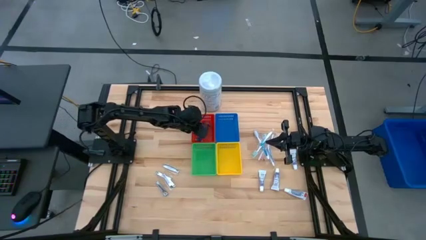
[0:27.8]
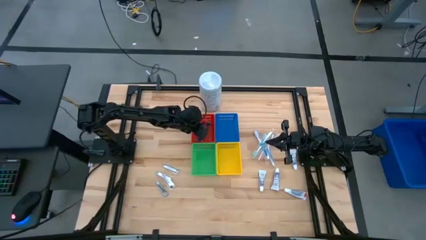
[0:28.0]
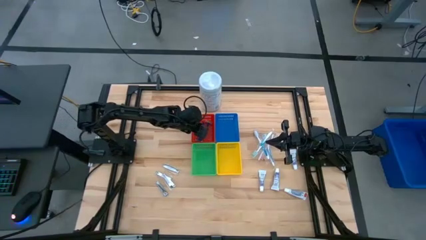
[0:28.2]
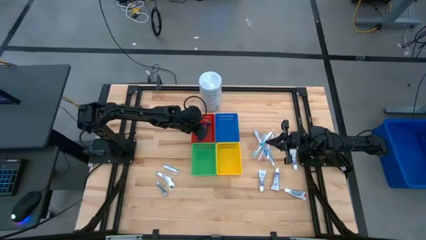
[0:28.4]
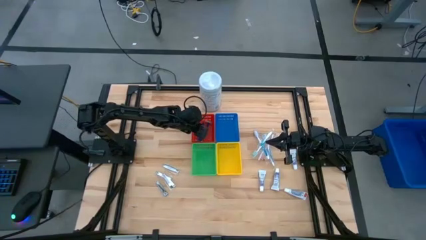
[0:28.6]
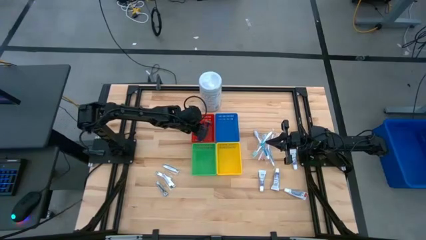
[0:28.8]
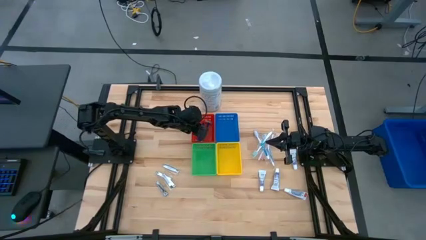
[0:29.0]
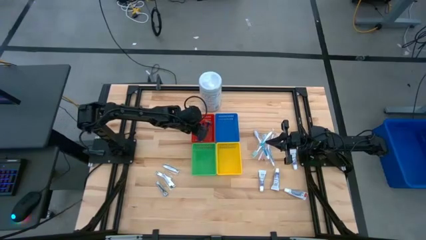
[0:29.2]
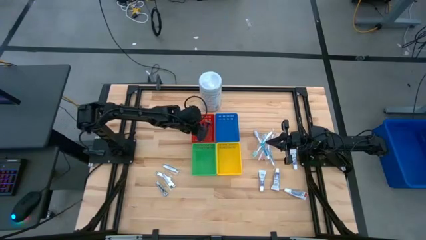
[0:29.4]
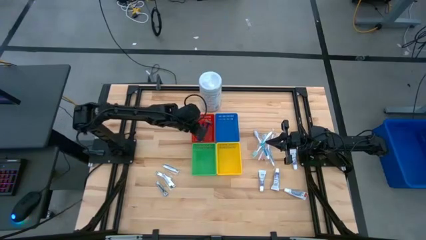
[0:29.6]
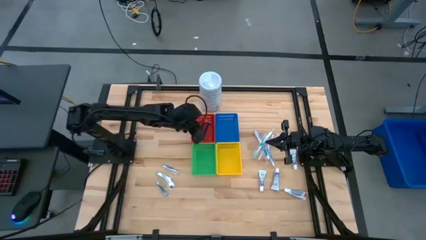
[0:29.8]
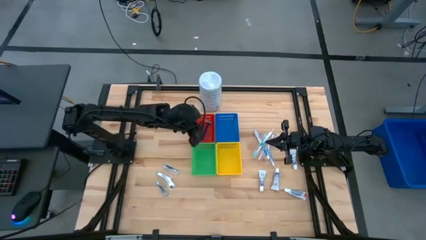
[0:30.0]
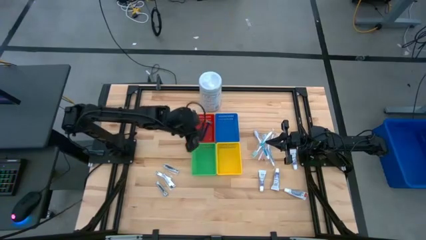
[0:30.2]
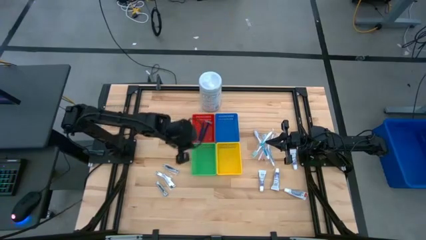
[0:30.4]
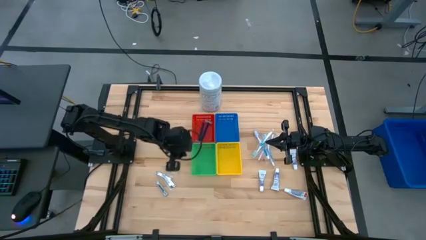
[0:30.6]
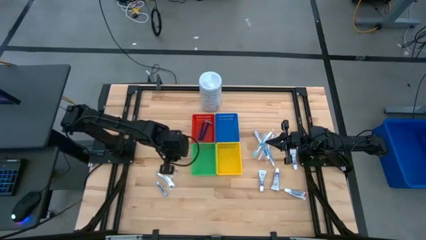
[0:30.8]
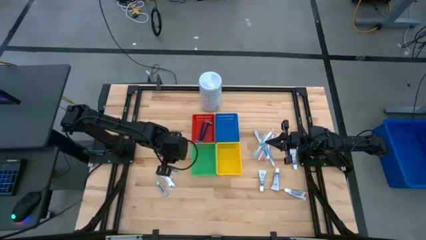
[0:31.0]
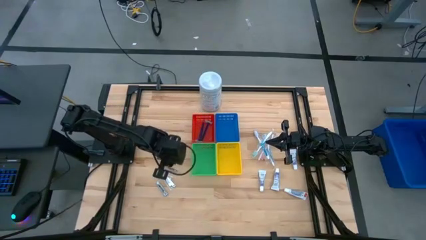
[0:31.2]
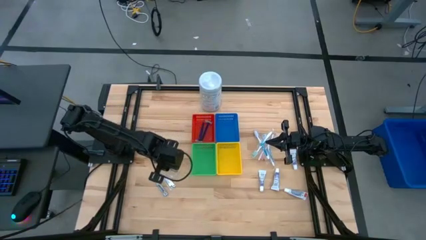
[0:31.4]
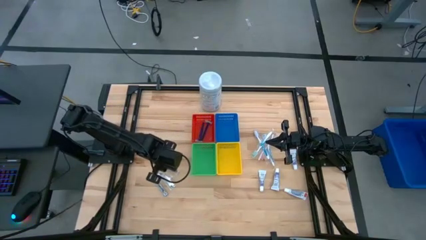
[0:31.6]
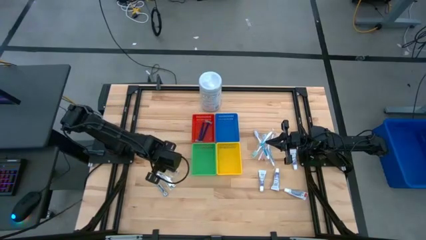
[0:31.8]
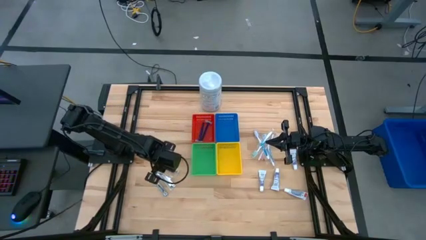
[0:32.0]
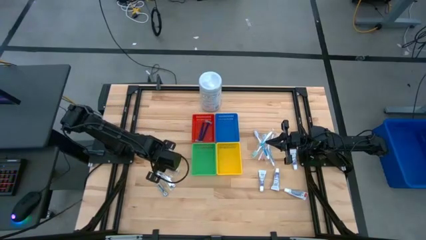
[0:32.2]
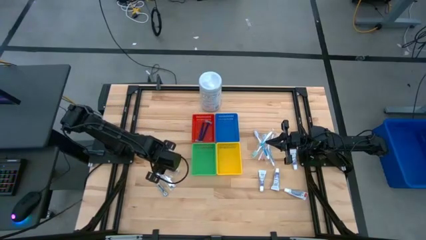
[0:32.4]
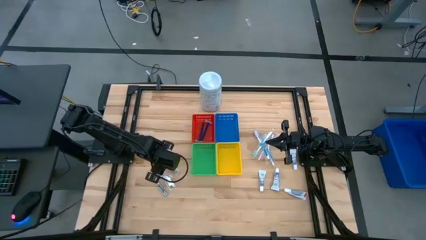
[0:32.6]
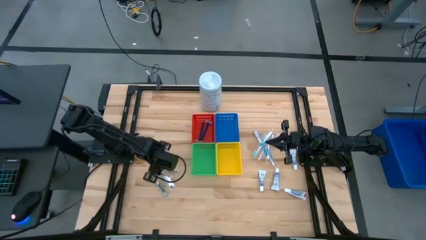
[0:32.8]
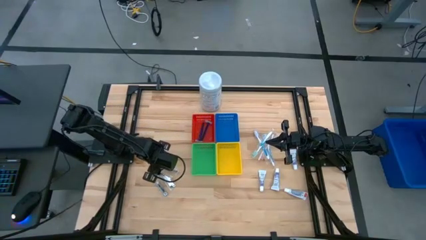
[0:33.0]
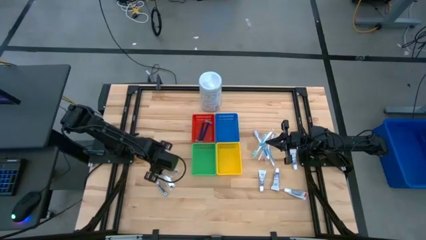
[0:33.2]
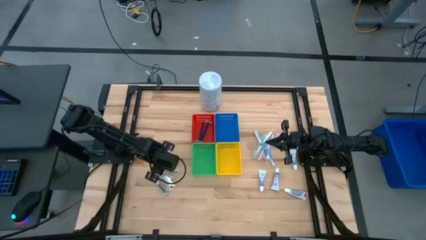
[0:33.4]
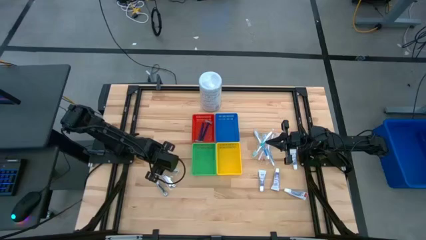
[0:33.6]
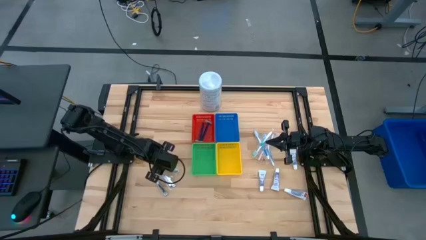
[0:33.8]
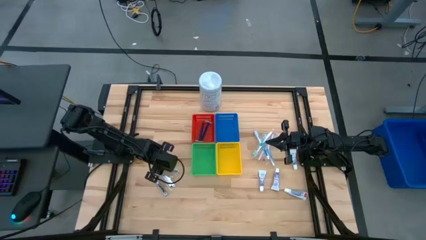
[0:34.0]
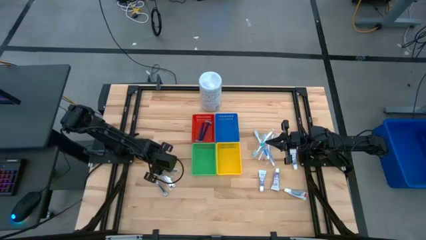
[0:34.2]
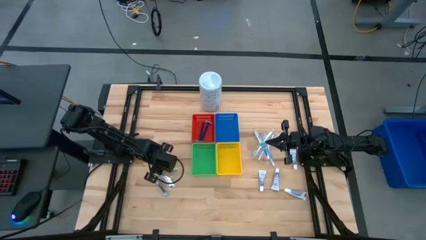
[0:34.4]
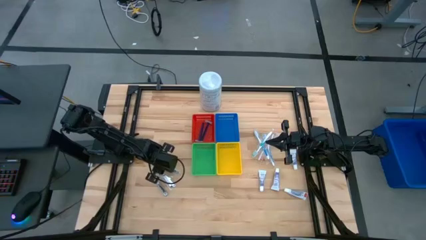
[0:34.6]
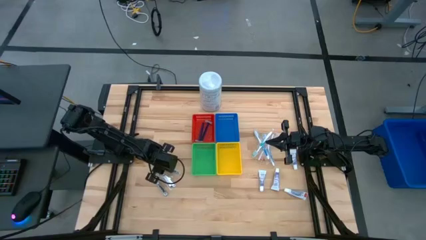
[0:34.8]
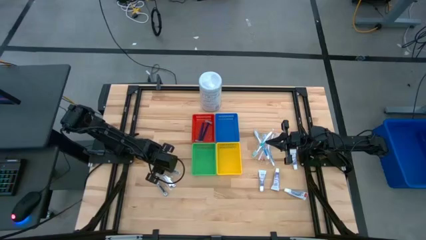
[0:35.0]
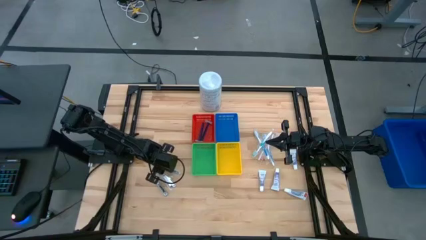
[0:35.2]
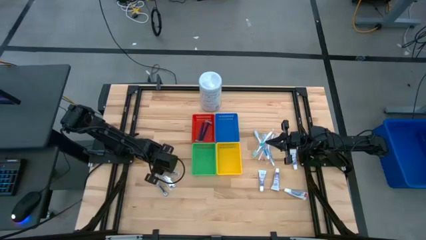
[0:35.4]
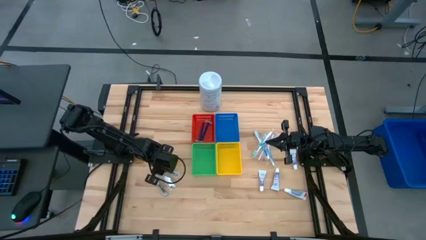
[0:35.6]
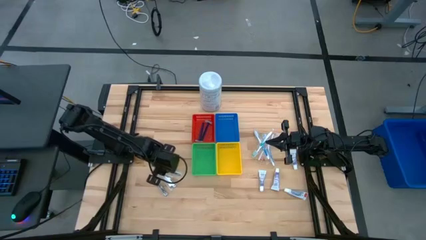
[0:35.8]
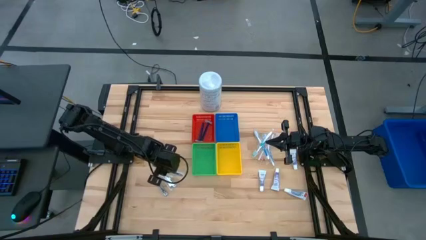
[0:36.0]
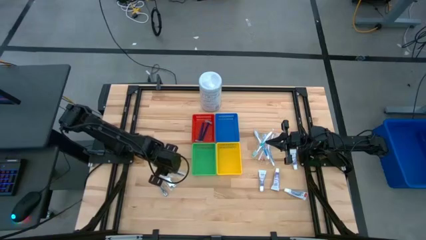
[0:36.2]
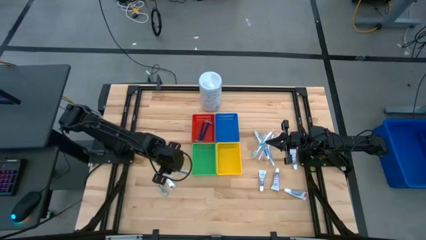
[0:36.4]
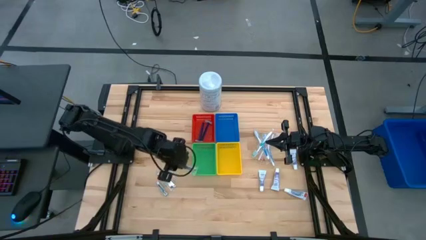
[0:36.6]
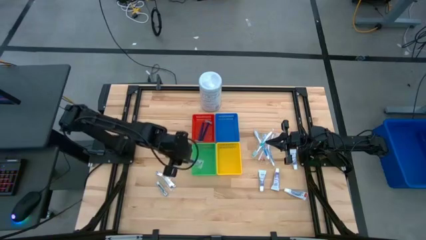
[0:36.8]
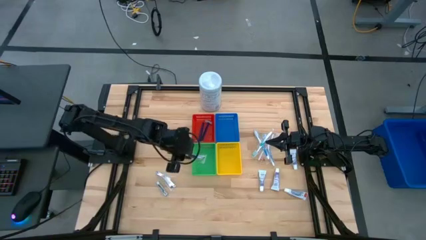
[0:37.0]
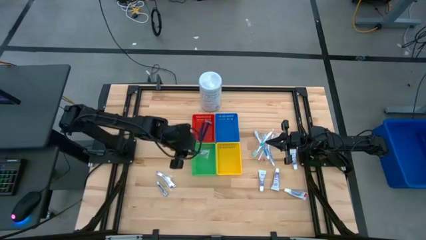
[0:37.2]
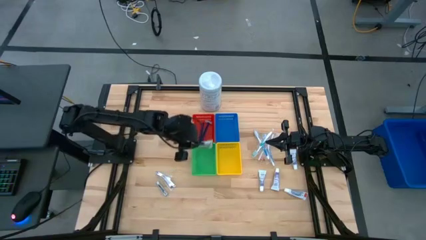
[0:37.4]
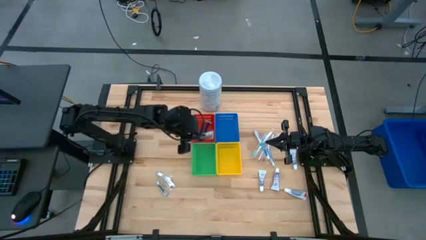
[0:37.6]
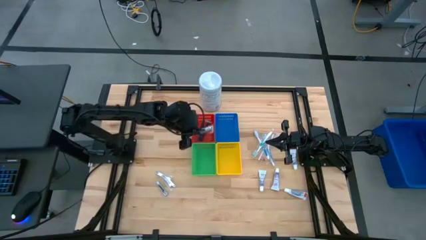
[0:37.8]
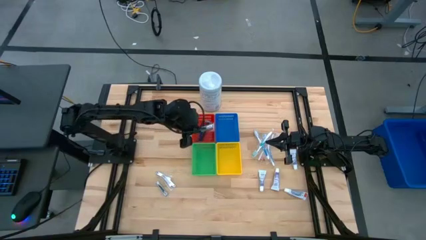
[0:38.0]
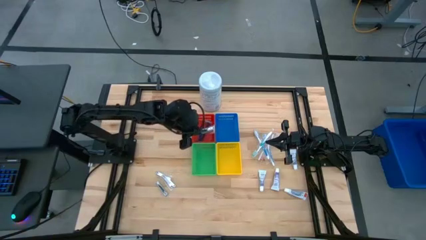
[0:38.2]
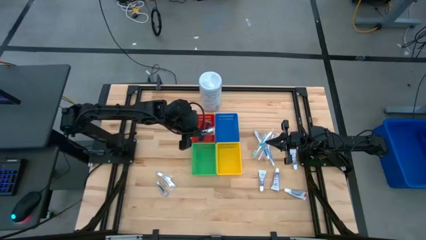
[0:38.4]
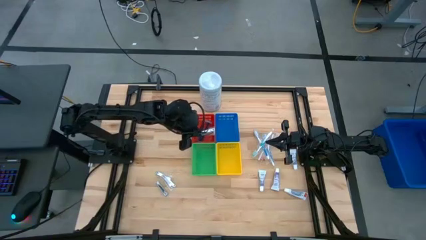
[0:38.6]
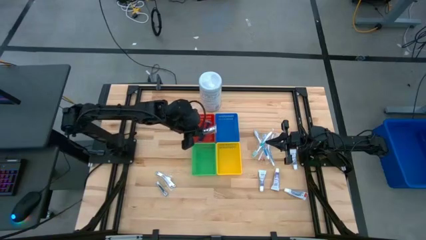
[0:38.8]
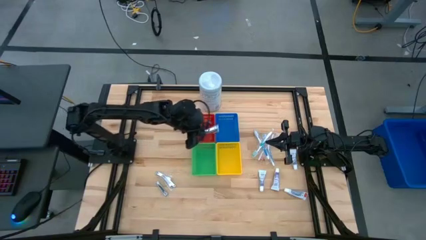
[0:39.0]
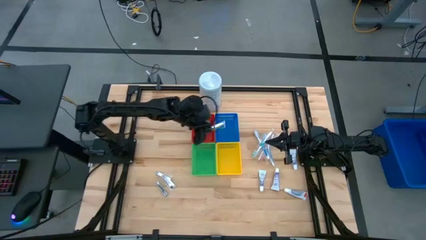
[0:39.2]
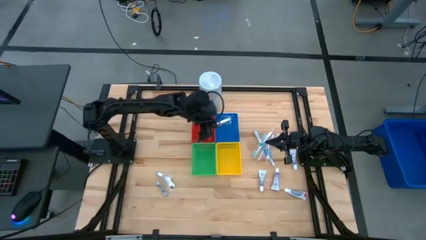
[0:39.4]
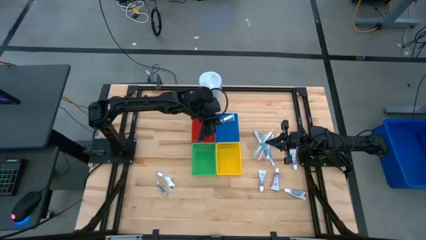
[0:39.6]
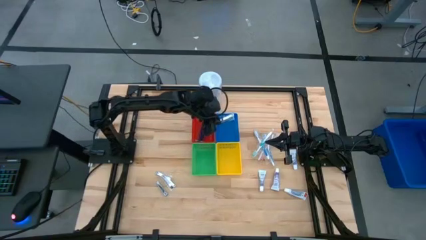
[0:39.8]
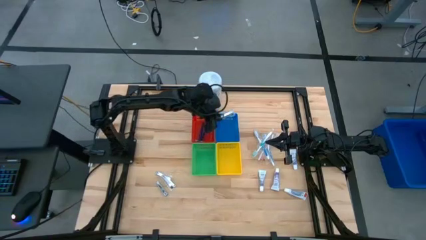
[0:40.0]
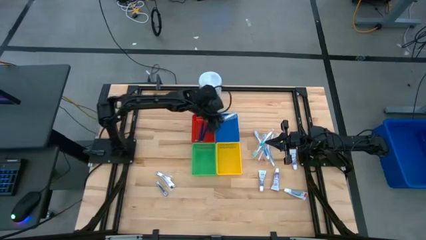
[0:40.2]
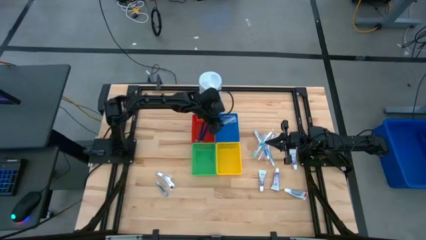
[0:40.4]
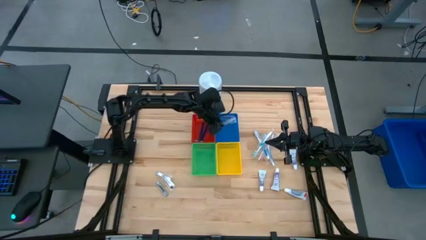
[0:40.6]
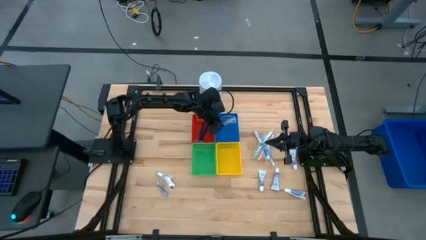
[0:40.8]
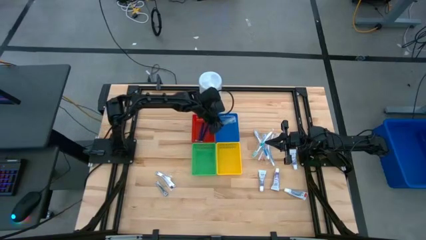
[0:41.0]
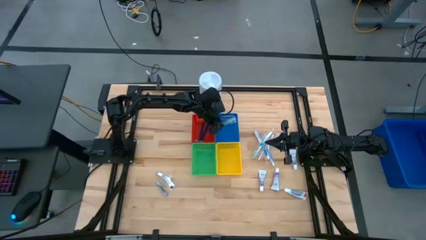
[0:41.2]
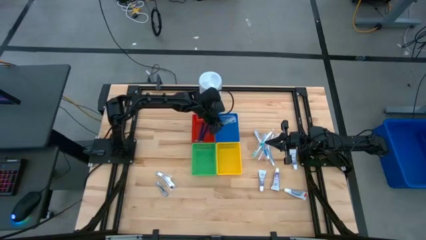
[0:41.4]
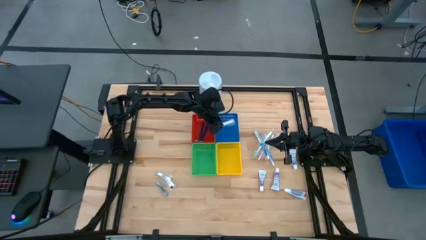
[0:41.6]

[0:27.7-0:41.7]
Task: Pick & Place Travel size toiletries
Put the silver nail cutter into the blue bin
